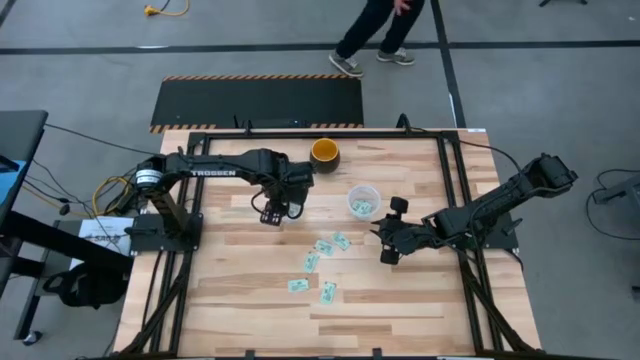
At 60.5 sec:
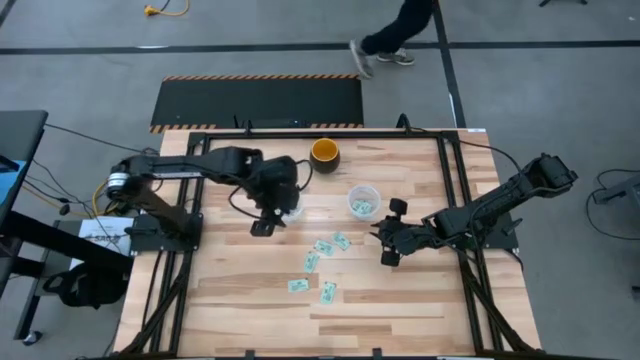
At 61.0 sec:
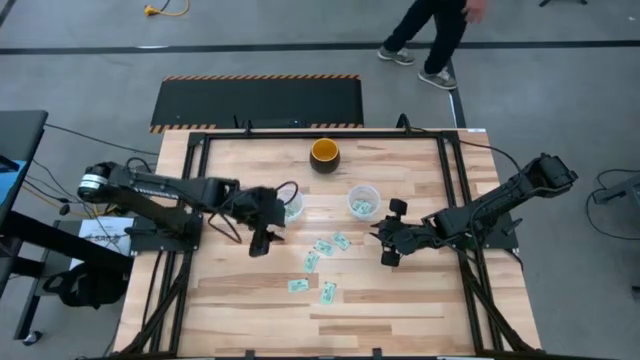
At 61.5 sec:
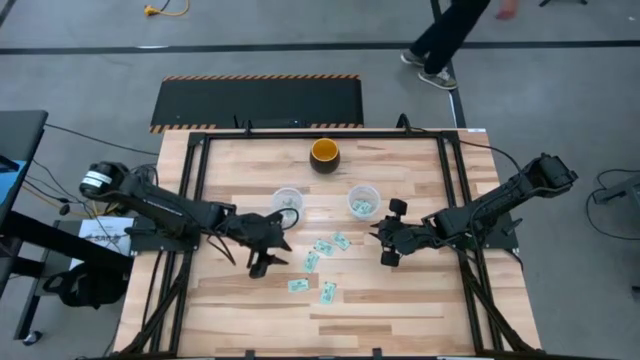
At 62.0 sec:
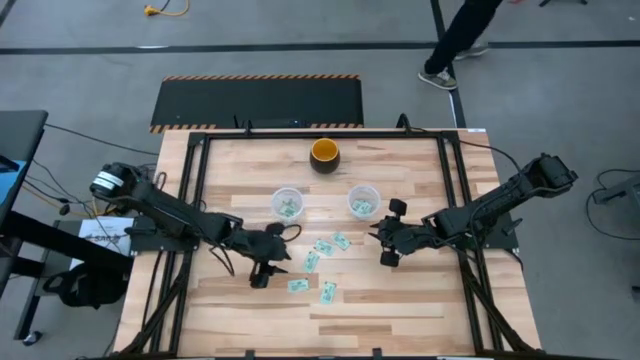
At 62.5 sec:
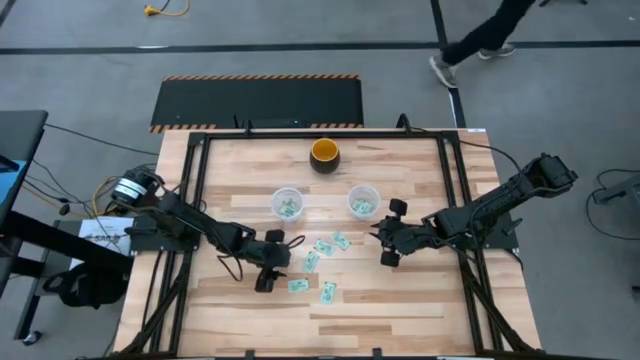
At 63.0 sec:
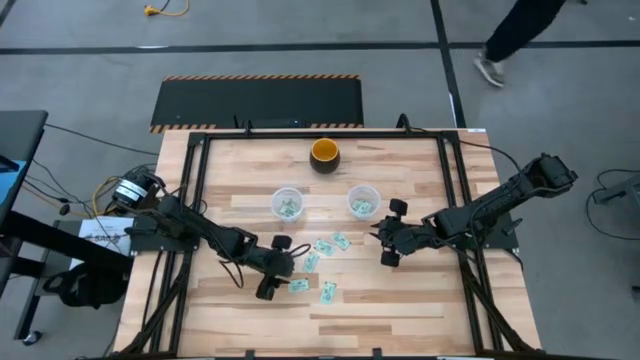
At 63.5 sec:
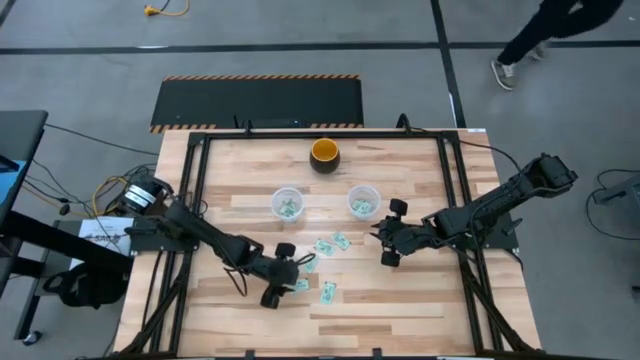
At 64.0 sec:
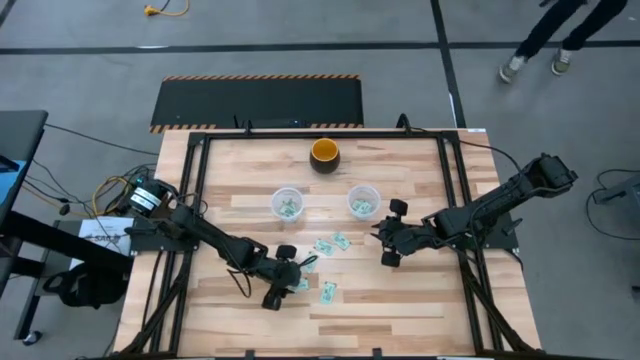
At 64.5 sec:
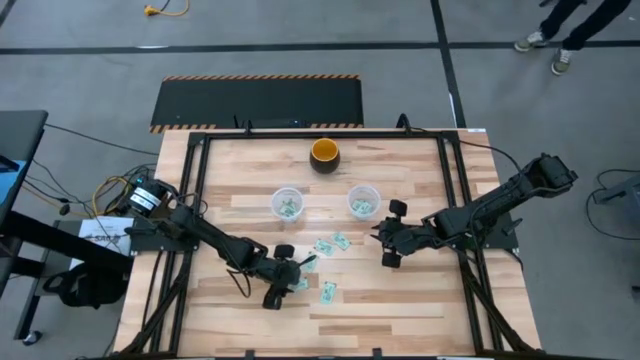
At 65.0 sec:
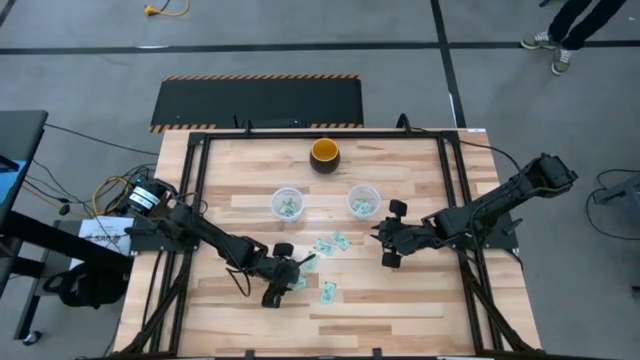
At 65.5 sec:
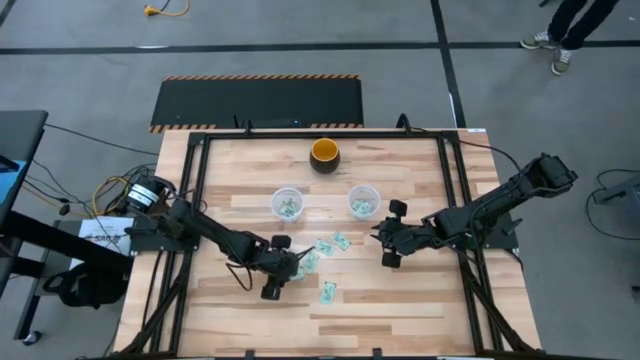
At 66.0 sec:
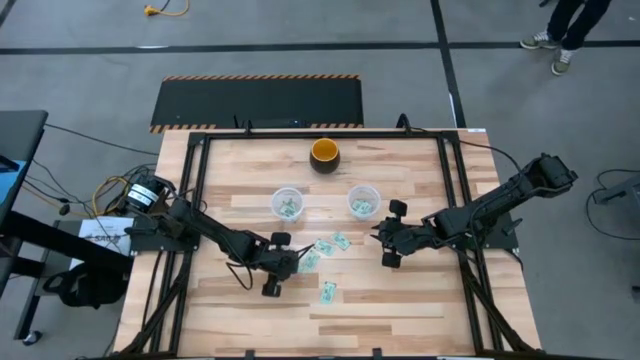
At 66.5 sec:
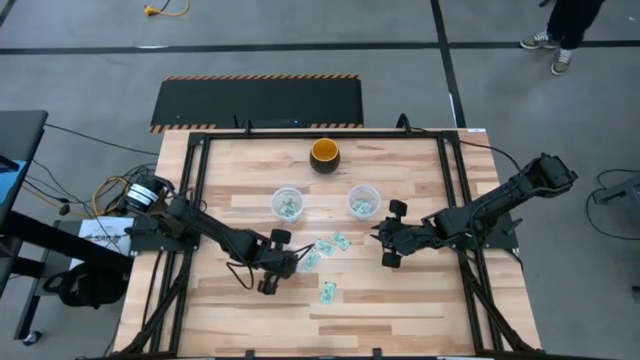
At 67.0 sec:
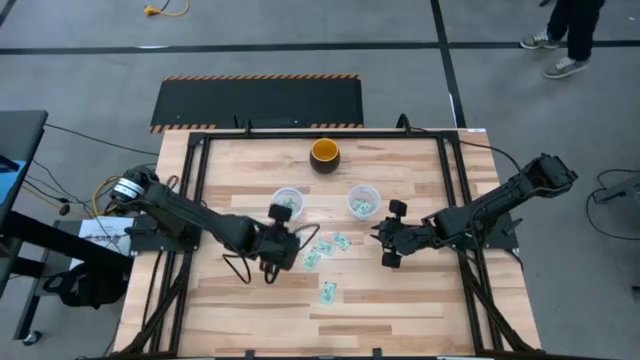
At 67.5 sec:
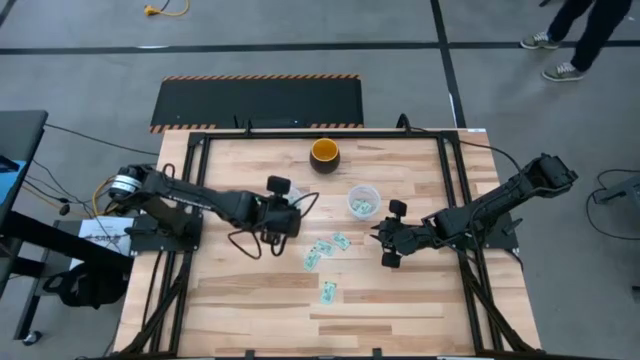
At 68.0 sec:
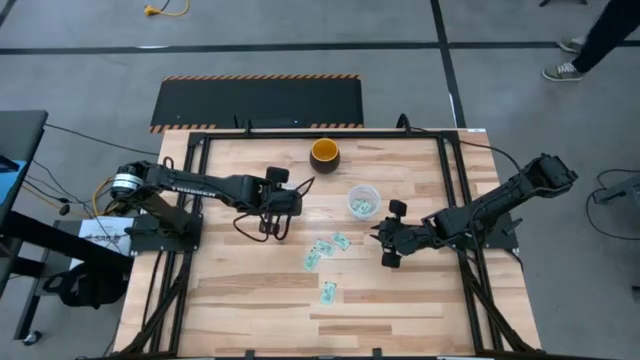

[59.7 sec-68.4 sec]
Task: Pick and place Stevia / Truvia into bins
Put the stevia packet into the left transparent container

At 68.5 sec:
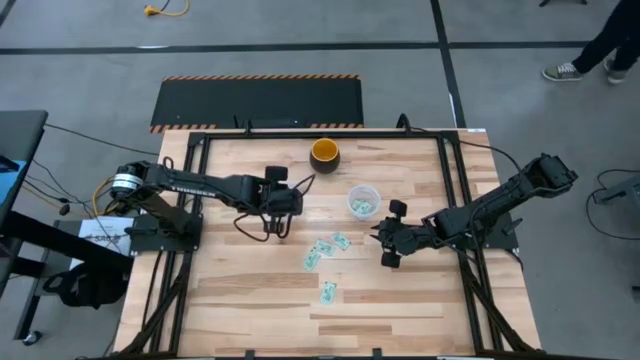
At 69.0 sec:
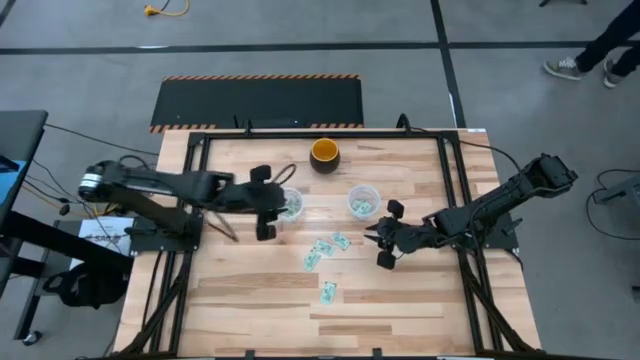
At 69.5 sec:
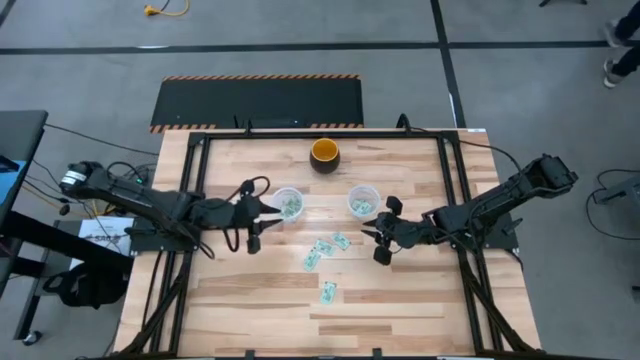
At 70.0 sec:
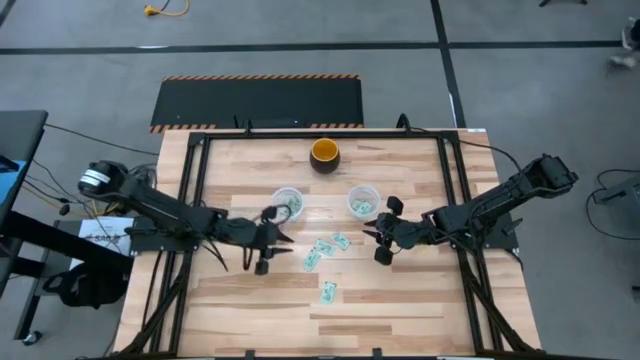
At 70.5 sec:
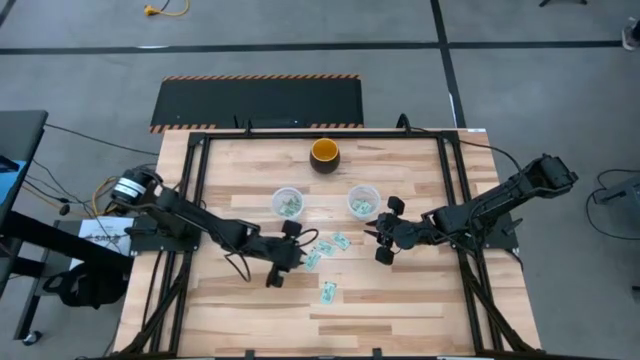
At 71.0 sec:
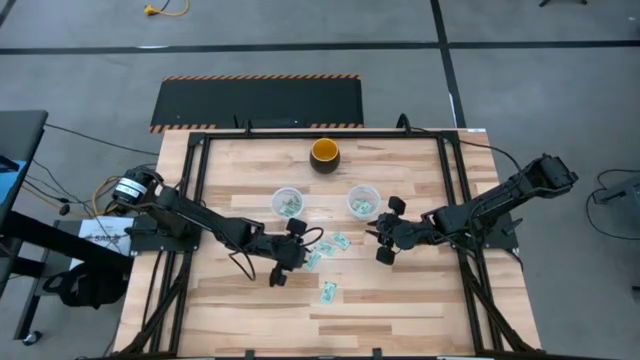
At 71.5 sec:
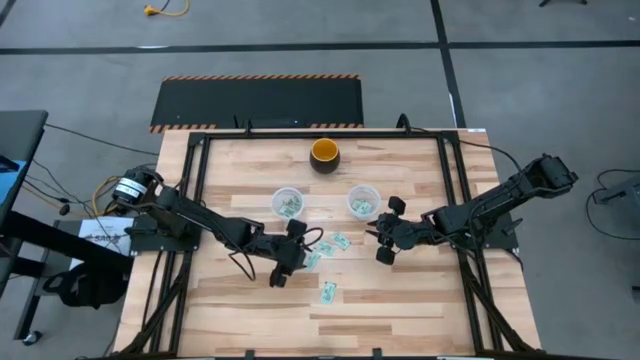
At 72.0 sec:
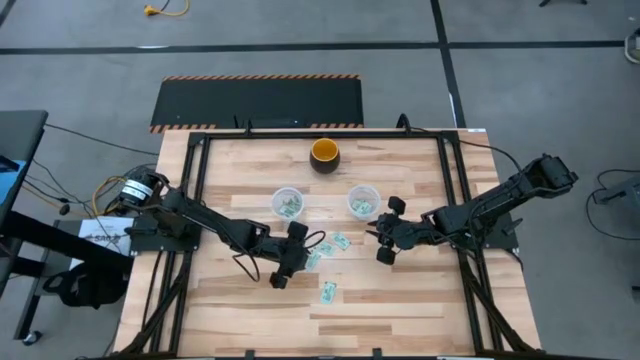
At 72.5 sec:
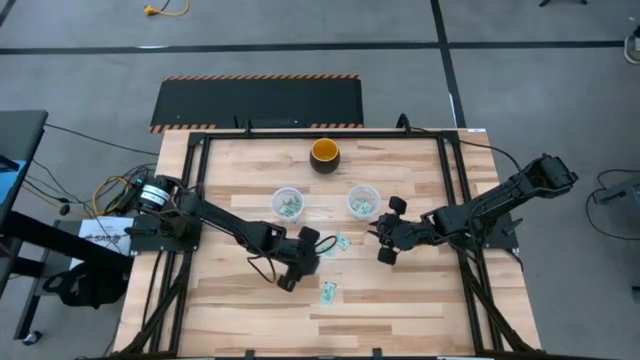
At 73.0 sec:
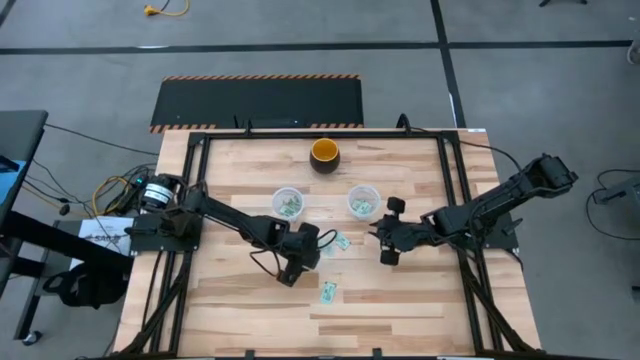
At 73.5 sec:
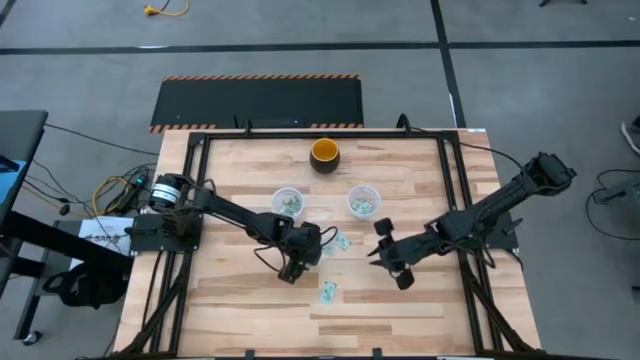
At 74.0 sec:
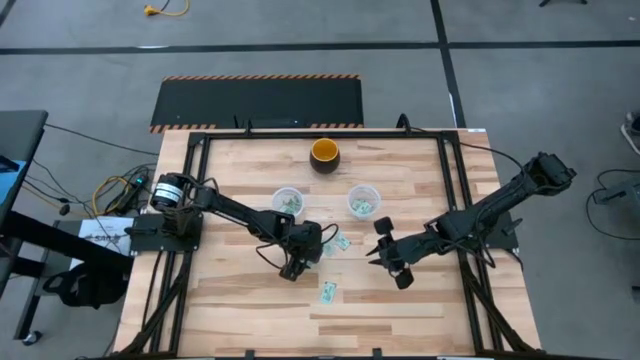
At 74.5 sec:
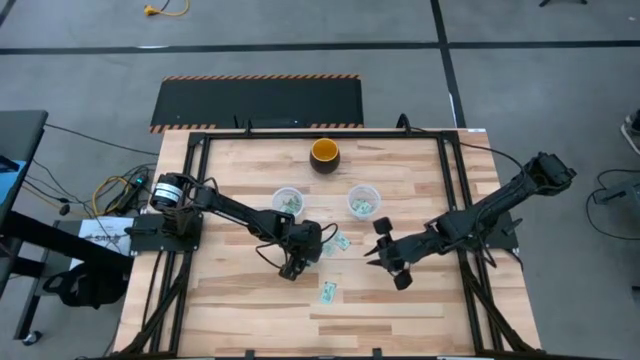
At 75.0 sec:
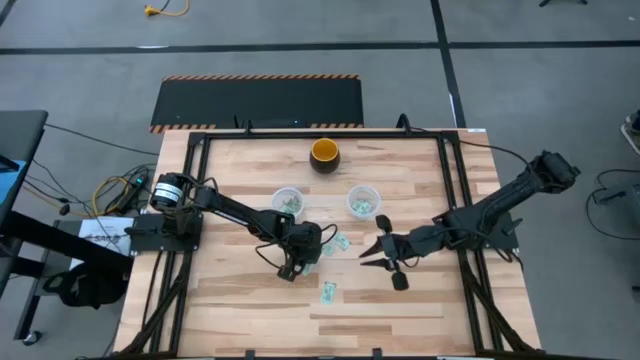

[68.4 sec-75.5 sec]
Put the stevia packet into the left transparent container

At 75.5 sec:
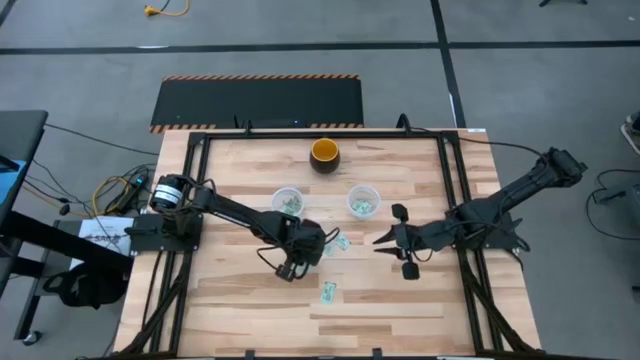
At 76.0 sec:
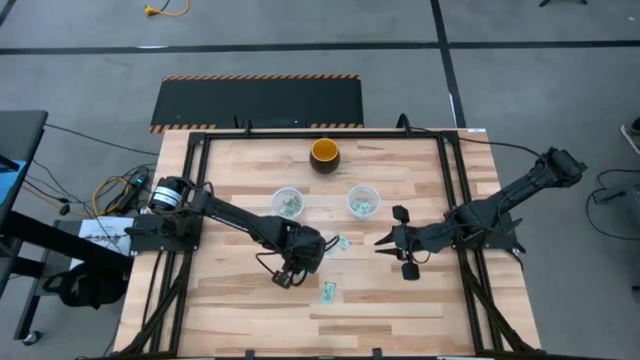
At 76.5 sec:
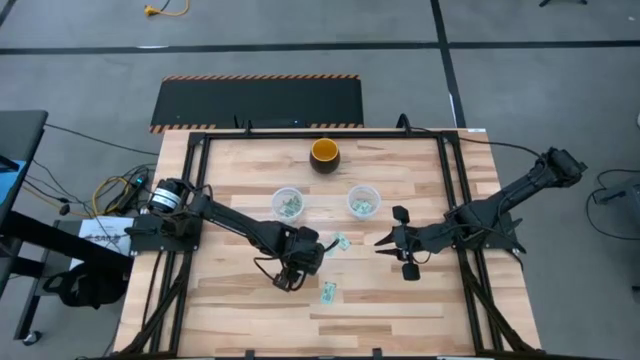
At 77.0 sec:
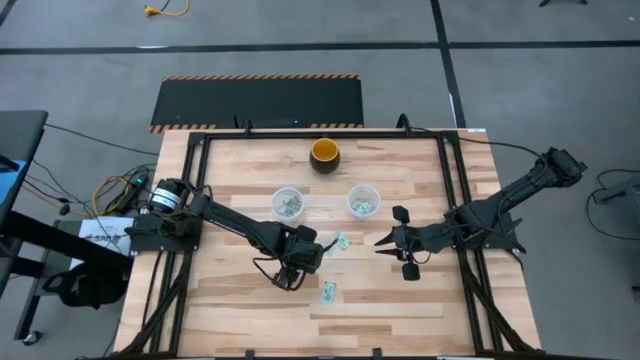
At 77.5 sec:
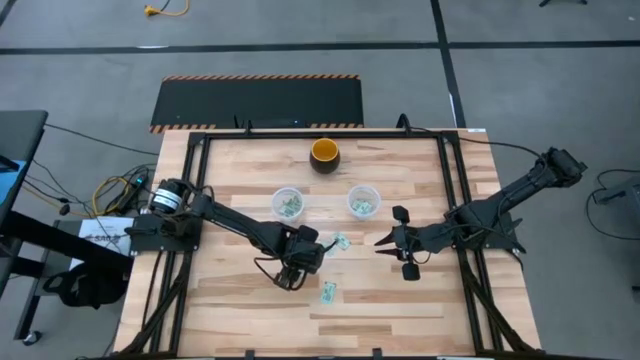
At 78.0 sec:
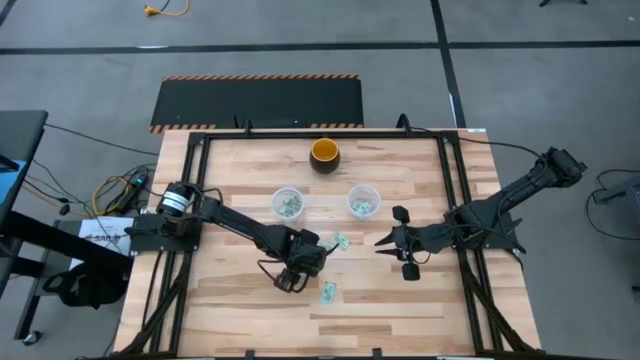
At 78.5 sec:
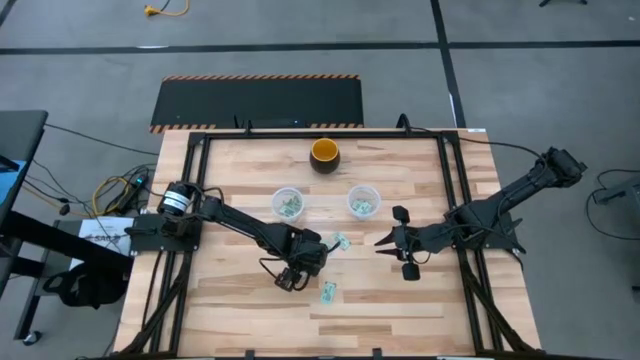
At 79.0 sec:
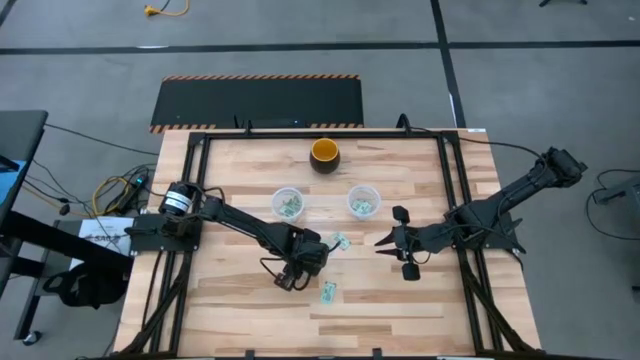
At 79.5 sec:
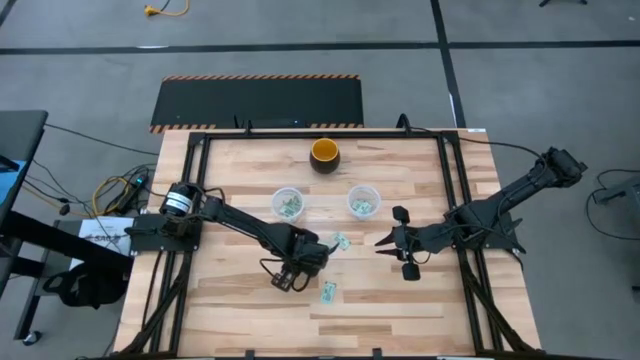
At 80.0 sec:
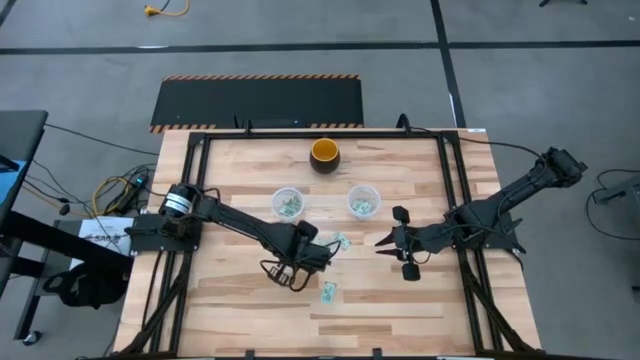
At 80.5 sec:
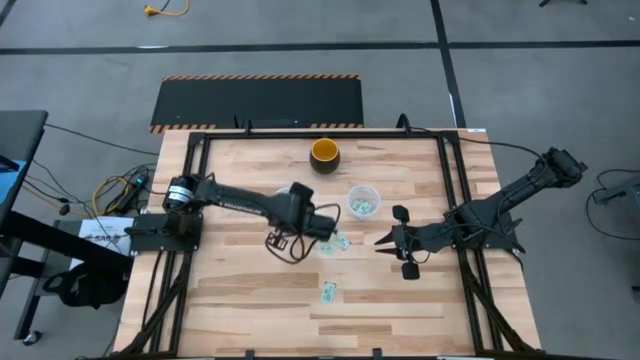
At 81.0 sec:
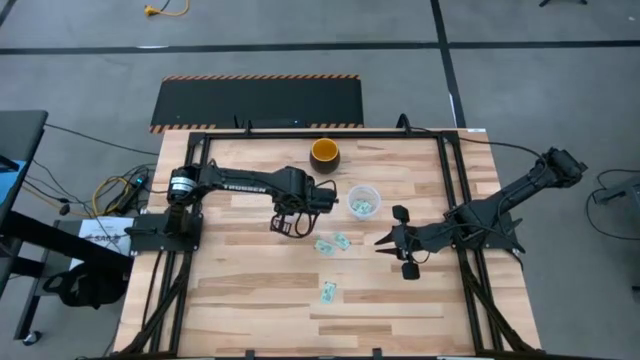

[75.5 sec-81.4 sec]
Put the stevia packet into the left transparent container
